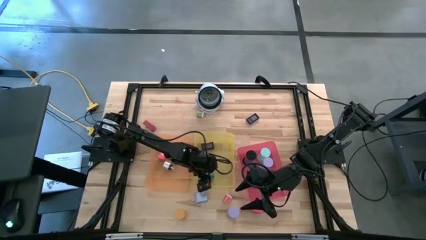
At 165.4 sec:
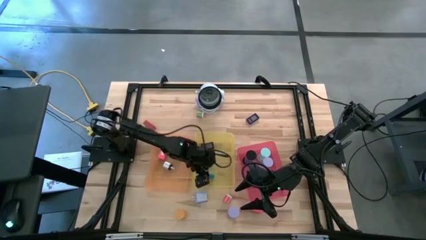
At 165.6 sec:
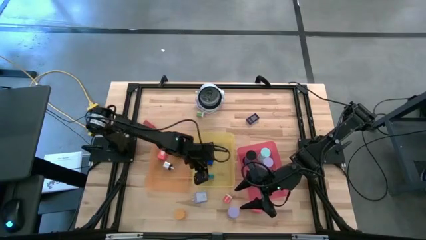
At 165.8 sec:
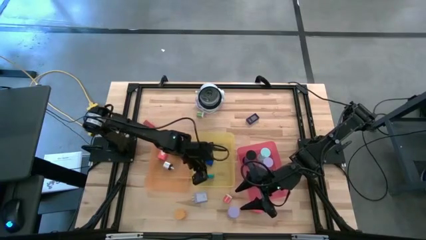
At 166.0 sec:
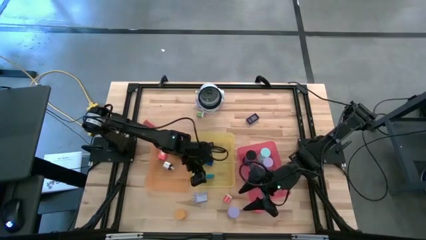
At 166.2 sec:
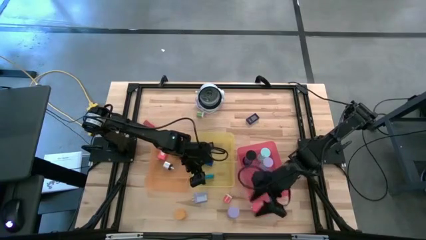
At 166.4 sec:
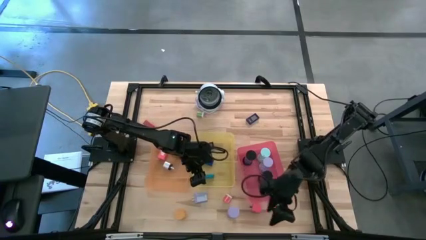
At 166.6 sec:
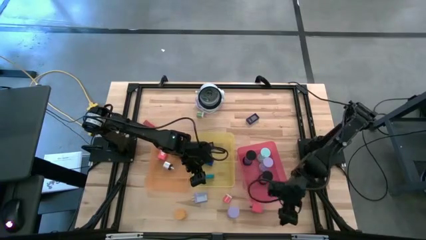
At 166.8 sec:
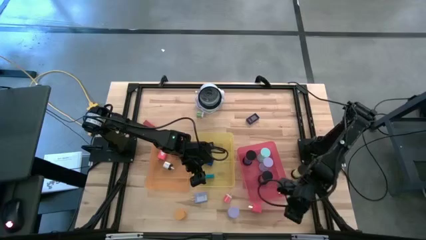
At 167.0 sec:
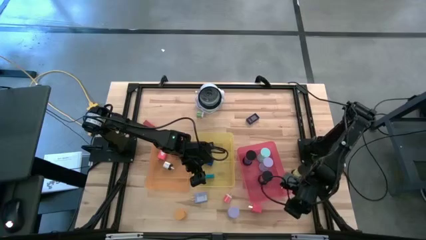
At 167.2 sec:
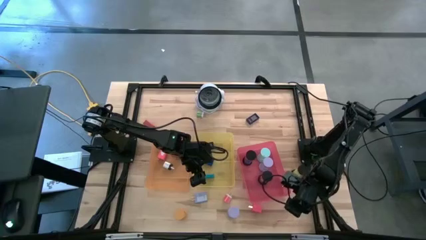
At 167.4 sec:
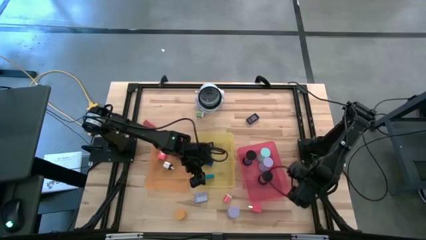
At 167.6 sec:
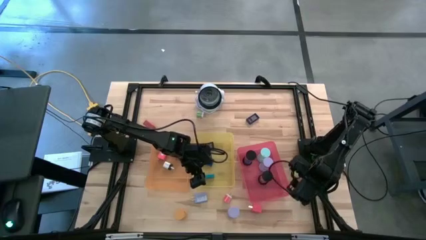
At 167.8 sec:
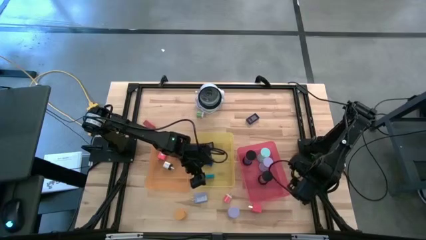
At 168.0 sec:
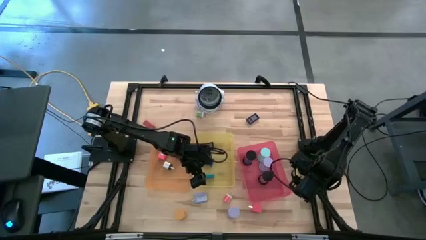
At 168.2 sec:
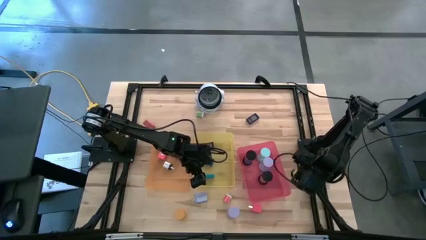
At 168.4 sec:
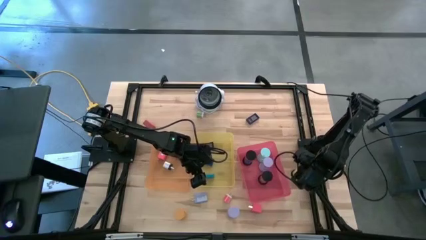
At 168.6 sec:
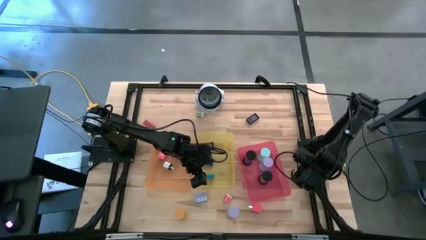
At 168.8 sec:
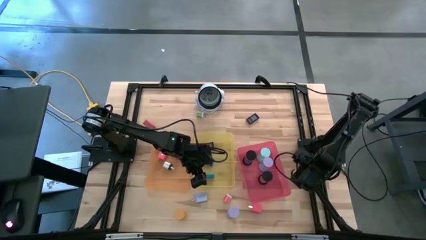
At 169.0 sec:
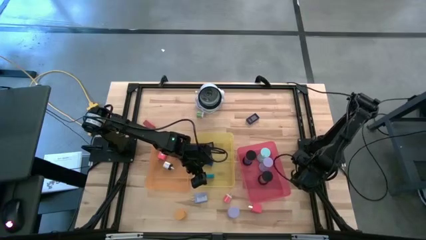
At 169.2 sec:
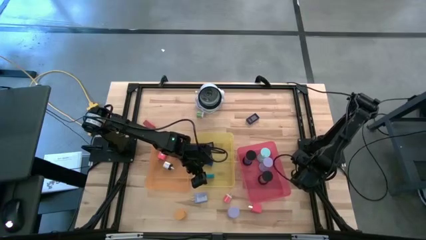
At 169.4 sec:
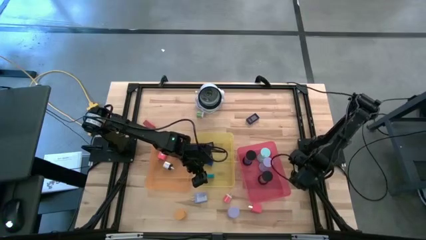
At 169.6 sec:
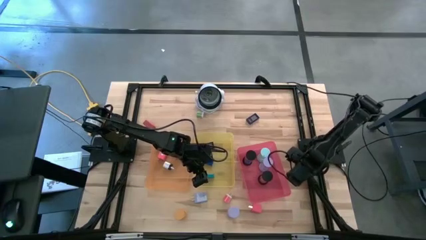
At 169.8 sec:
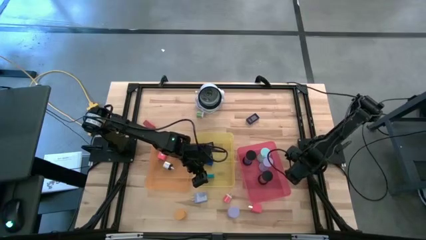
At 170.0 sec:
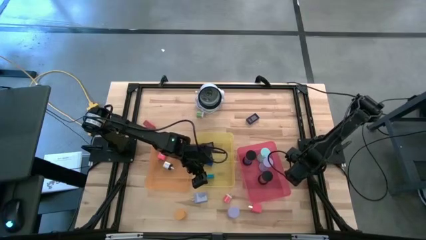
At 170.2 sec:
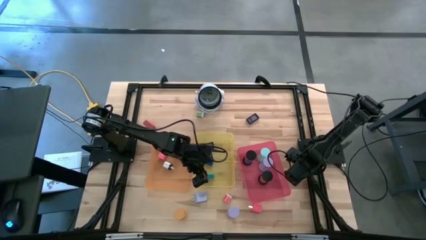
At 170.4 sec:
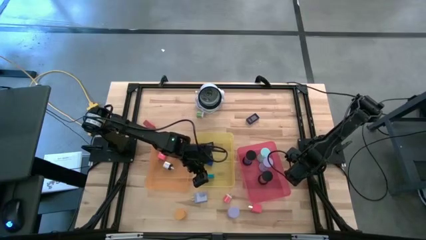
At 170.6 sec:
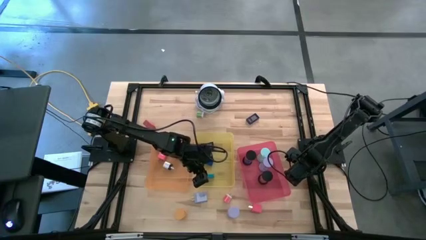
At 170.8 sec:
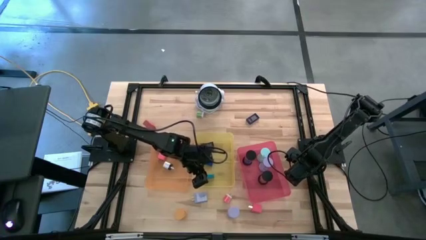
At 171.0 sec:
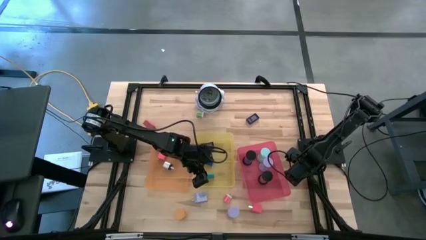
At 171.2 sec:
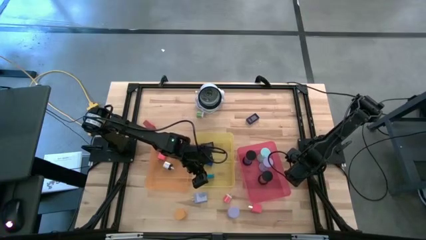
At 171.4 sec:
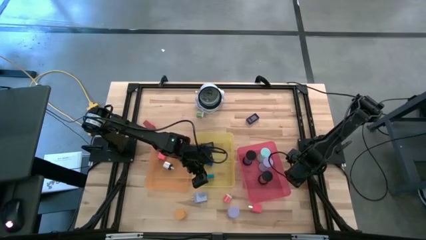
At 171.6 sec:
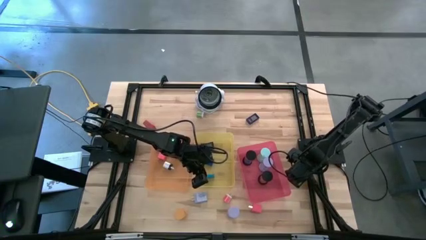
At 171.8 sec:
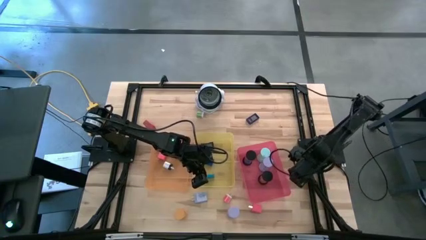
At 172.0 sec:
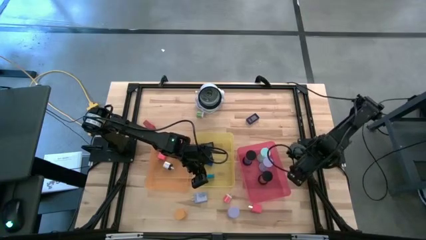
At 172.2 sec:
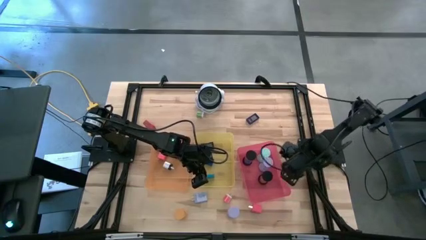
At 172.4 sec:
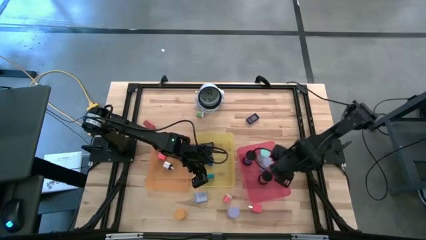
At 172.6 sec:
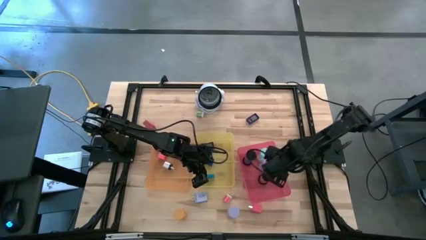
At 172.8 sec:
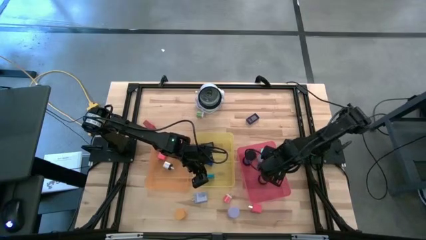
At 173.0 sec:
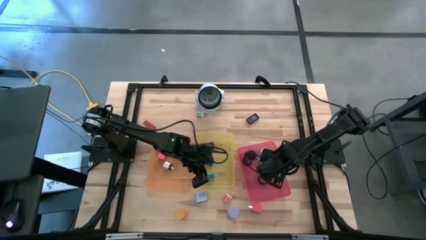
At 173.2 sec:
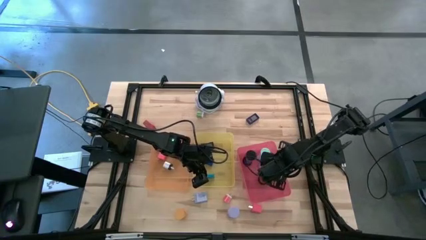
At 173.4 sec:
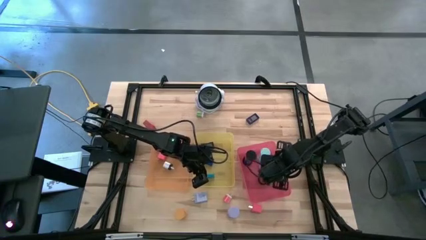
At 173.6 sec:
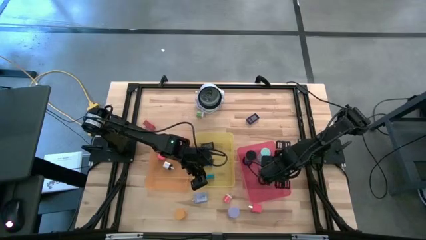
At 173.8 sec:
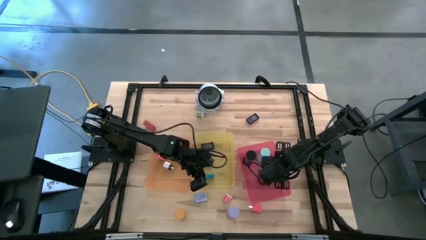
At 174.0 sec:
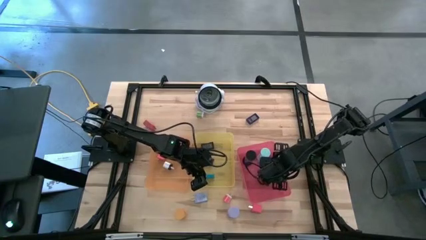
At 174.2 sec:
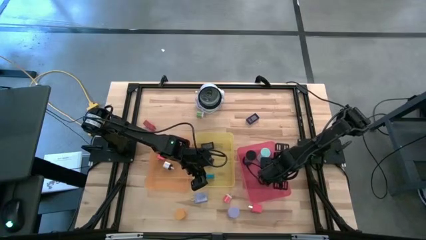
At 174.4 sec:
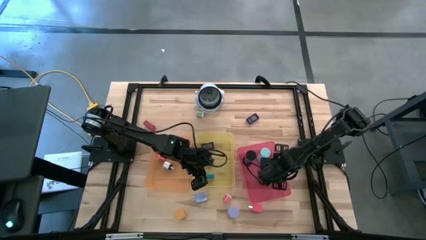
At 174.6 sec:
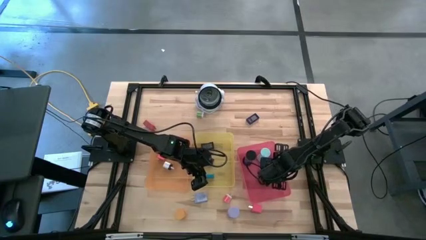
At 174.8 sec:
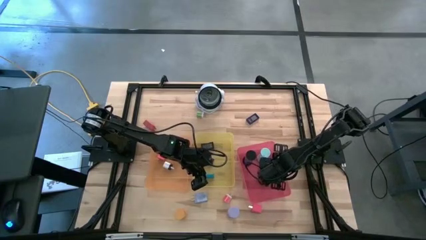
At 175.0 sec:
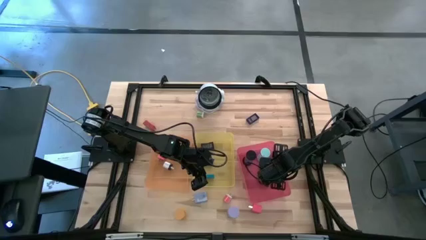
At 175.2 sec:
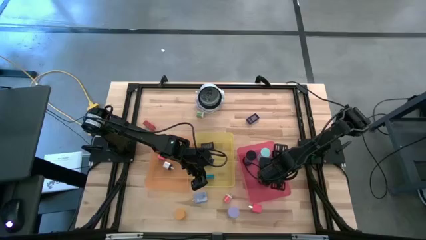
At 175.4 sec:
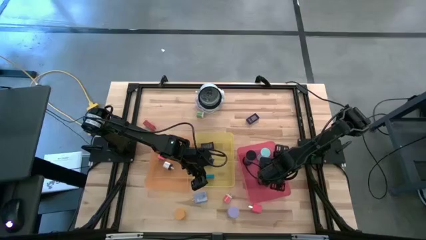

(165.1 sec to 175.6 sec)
Task: Pick & Place Office items
Put the black hourglass timer into the red bin
